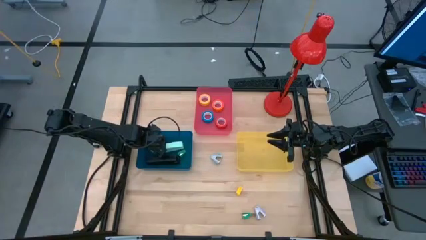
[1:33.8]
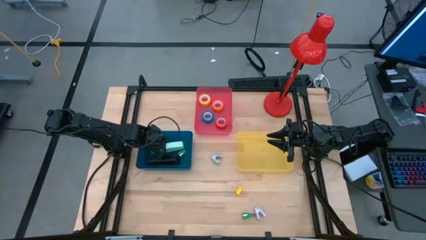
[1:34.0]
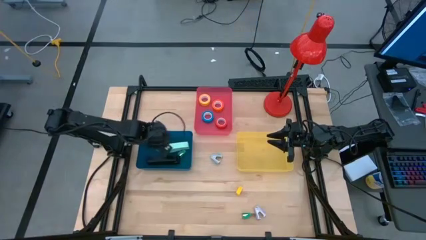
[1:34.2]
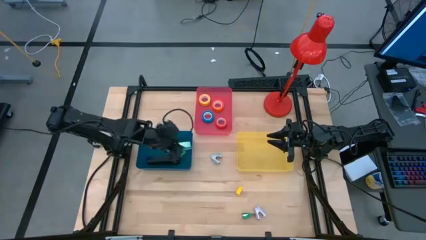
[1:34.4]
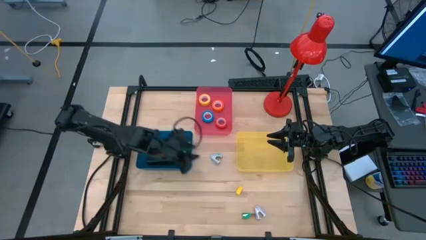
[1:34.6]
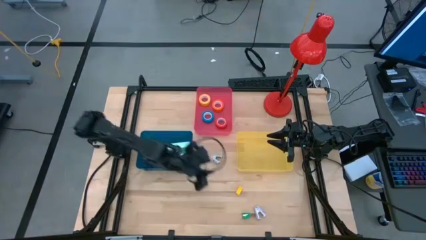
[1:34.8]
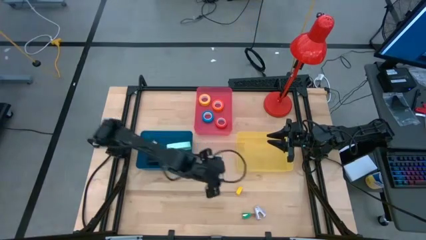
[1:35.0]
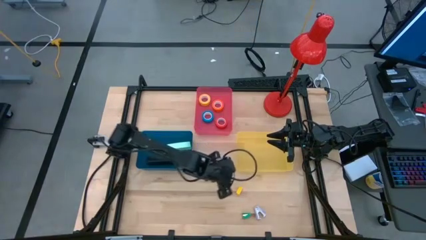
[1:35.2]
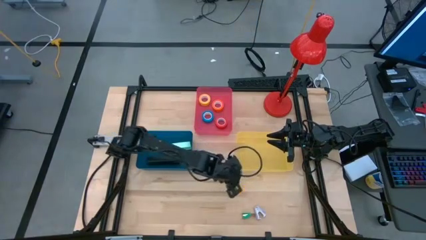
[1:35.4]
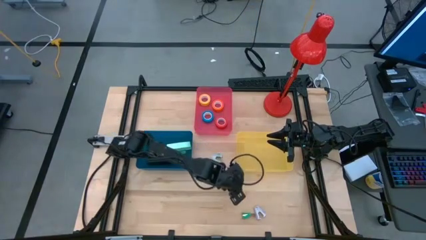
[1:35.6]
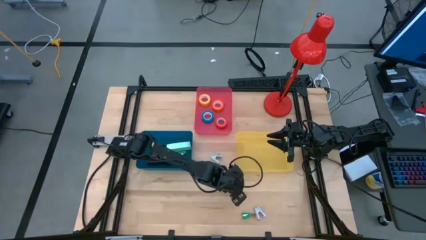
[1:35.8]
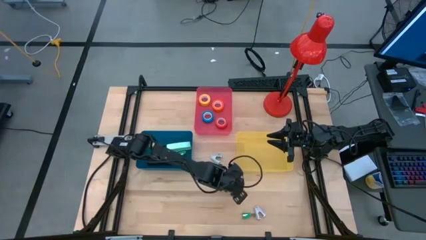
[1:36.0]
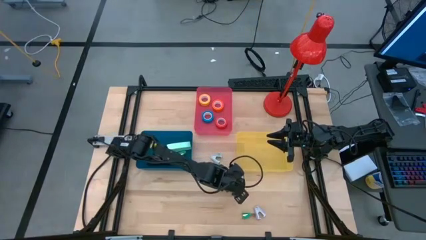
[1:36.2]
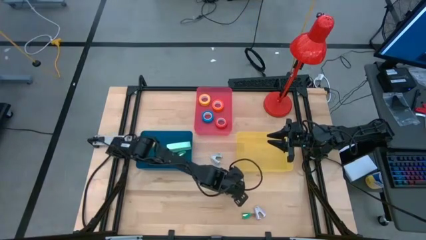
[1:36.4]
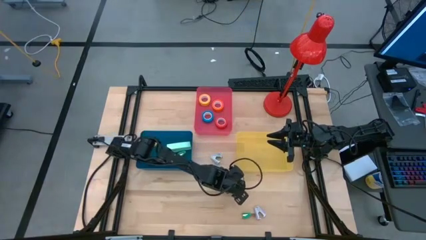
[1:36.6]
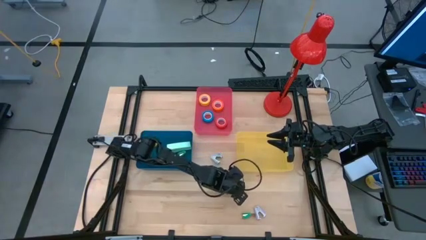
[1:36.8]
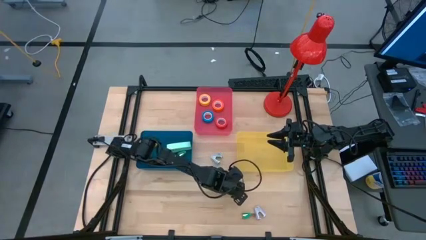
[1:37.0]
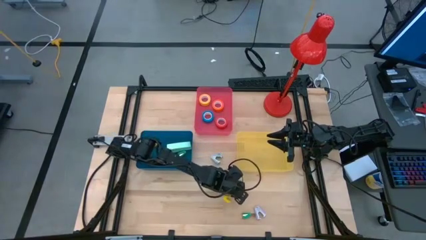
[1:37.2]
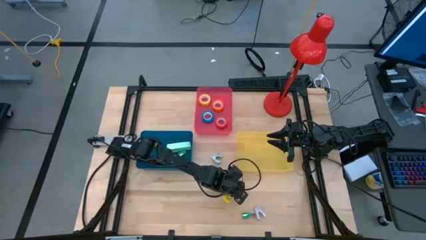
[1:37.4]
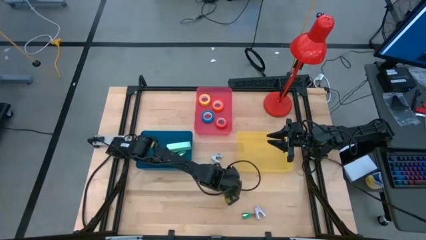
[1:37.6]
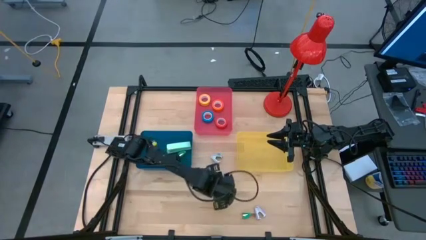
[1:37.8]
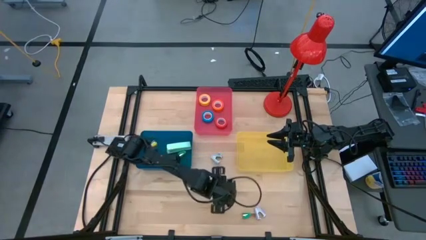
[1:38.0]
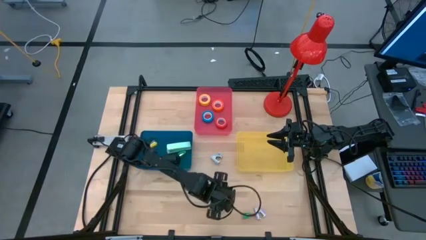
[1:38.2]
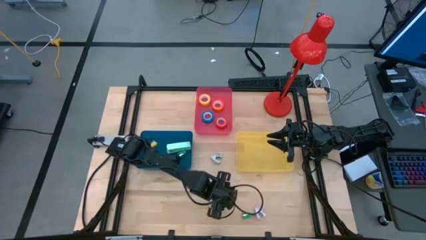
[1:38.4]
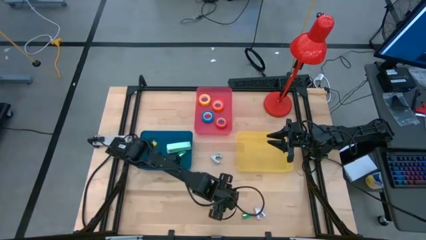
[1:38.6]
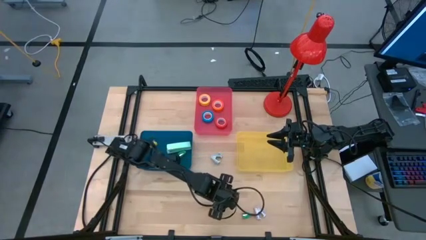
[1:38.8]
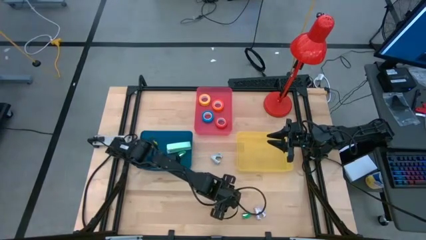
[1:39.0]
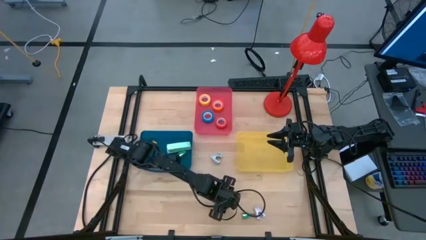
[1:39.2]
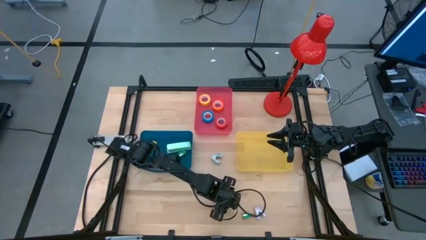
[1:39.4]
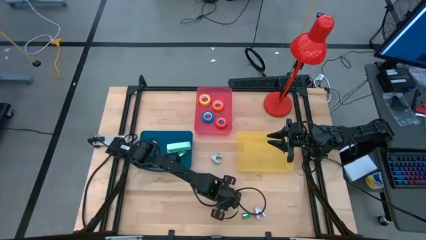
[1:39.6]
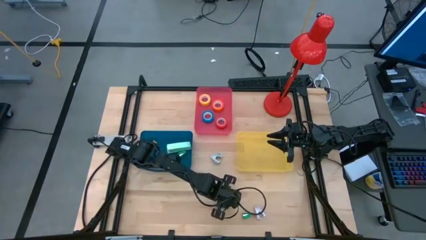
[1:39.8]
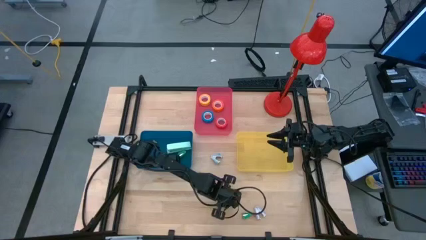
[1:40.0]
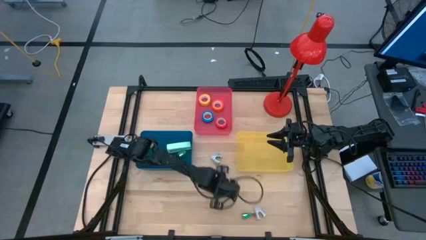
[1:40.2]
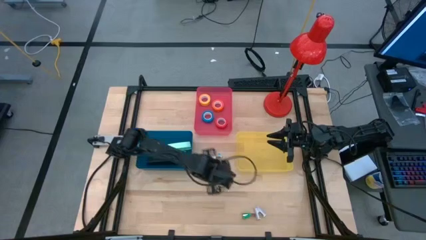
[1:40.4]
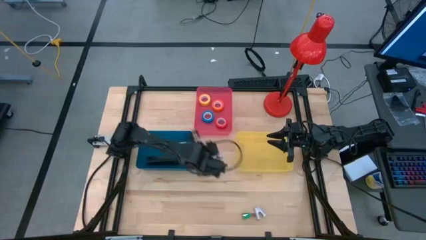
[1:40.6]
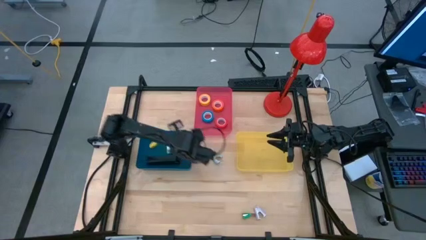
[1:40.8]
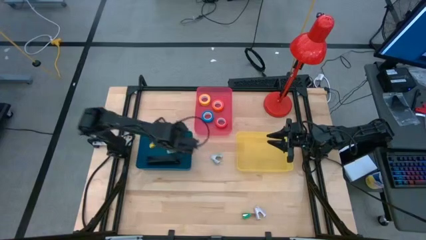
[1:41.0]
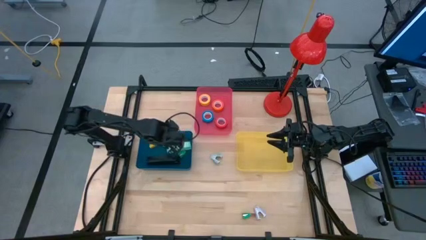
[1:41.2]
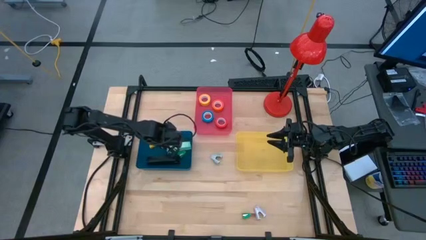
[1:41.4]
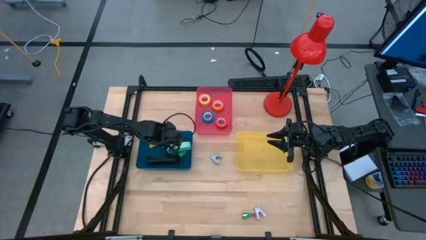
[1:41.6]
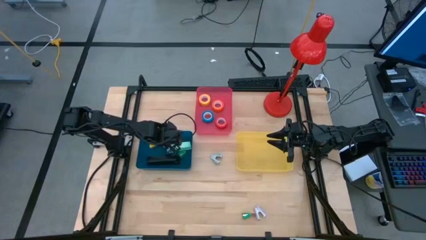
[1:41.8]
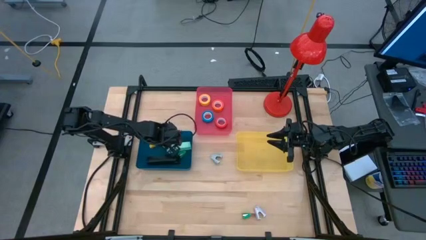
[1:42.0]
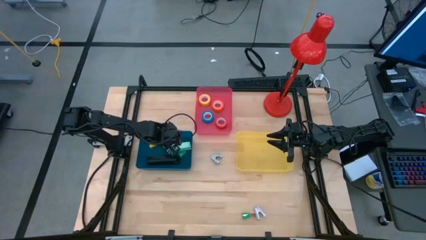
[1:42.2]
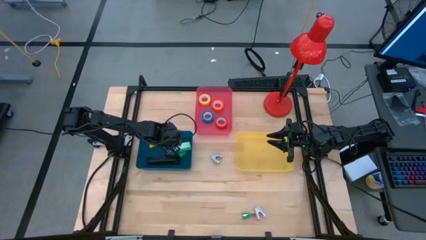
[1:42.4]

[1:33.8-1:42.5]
Task: Pick and place Stapler, Stapler remover, tape
Put the yellow stapler into the blue bin

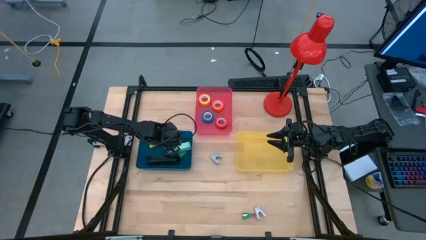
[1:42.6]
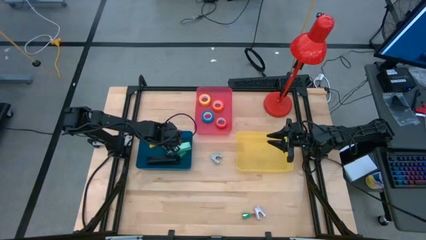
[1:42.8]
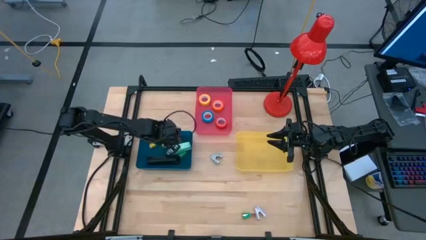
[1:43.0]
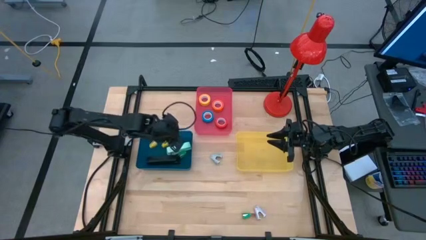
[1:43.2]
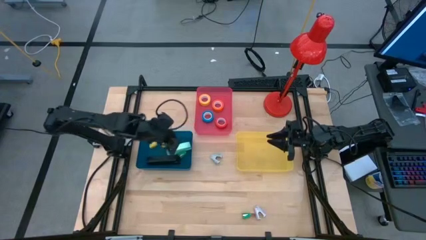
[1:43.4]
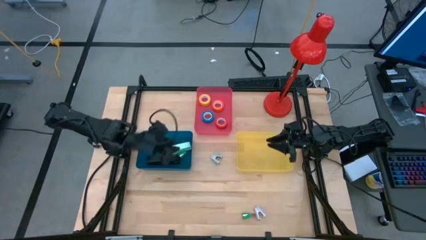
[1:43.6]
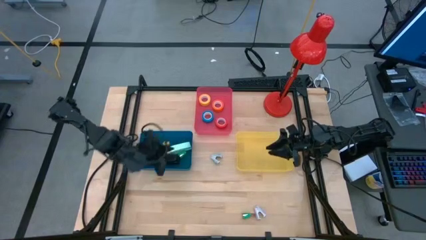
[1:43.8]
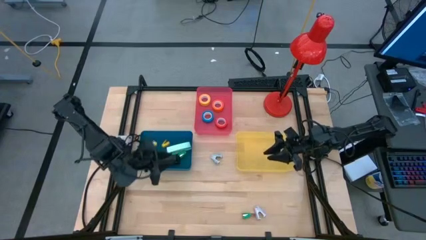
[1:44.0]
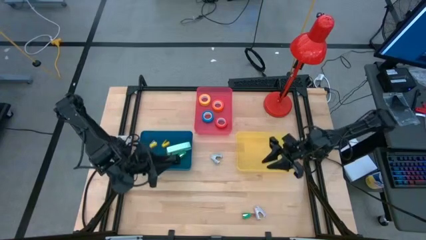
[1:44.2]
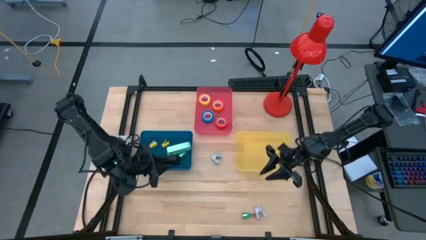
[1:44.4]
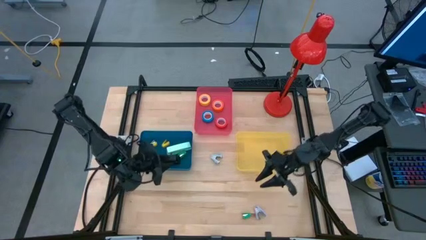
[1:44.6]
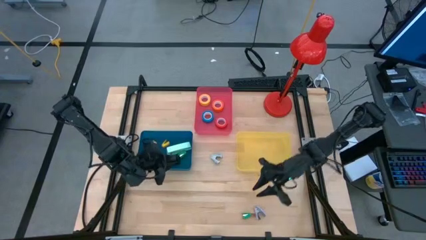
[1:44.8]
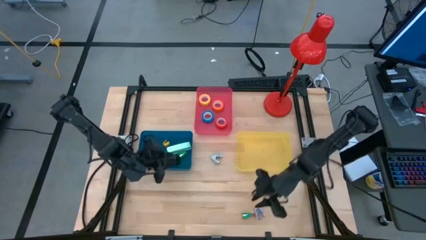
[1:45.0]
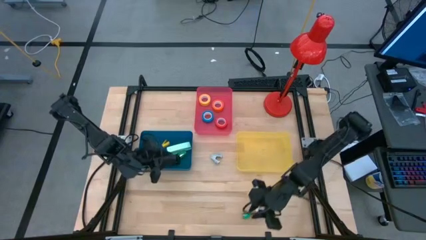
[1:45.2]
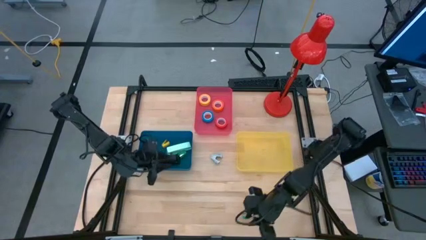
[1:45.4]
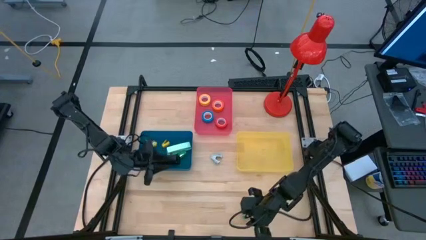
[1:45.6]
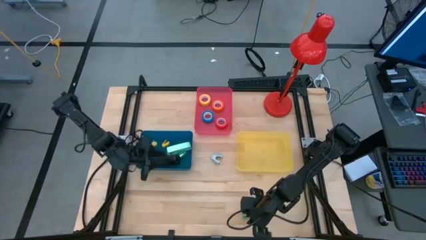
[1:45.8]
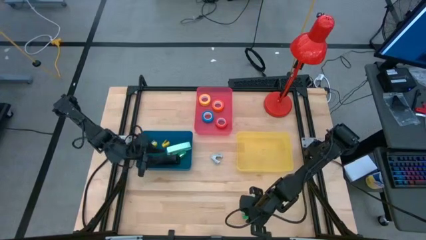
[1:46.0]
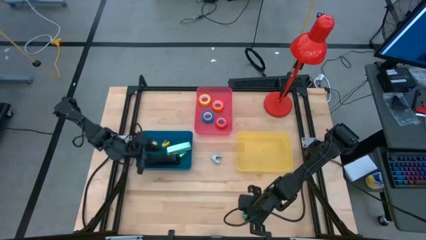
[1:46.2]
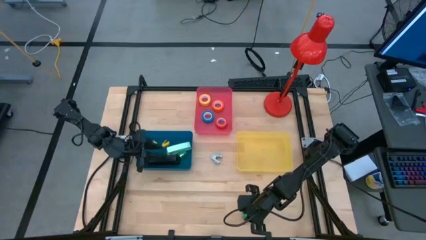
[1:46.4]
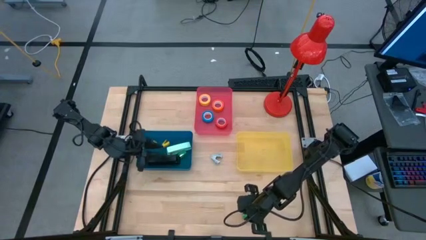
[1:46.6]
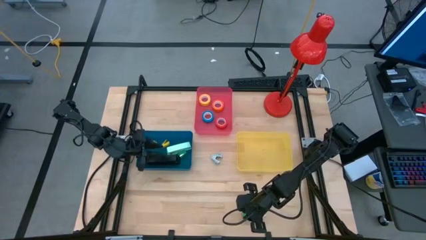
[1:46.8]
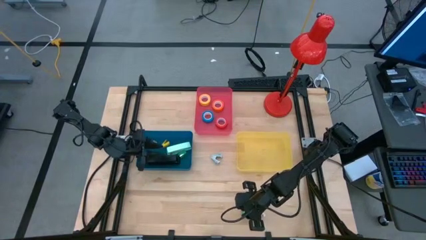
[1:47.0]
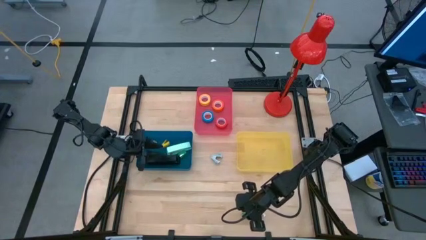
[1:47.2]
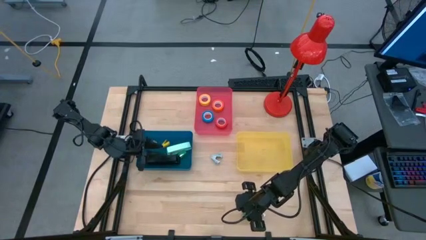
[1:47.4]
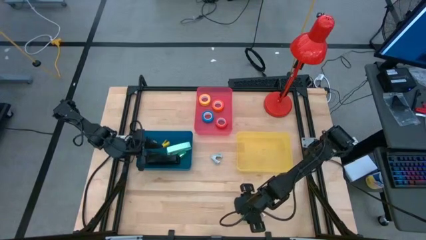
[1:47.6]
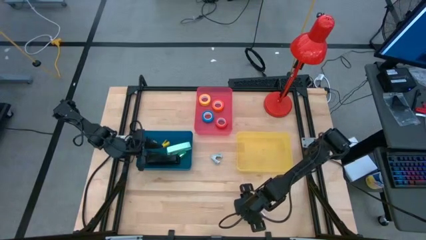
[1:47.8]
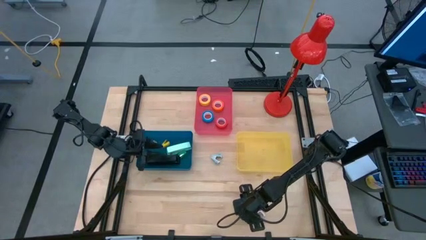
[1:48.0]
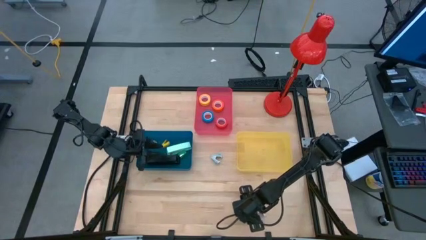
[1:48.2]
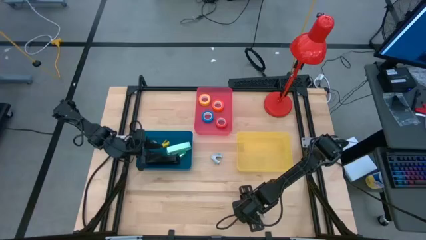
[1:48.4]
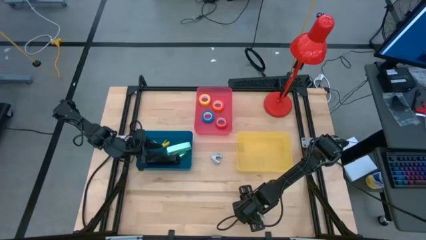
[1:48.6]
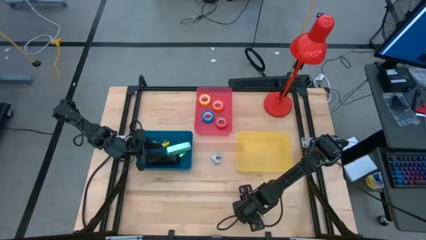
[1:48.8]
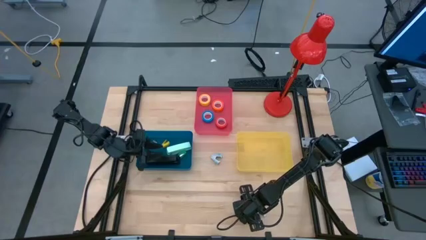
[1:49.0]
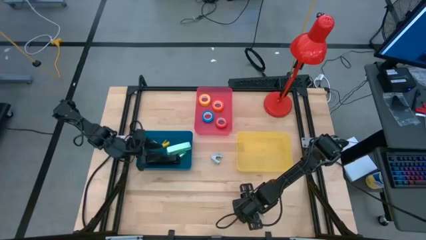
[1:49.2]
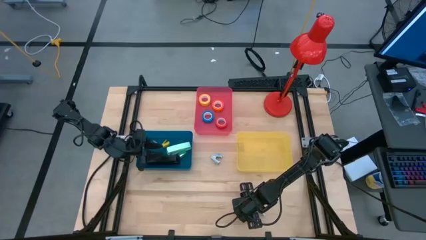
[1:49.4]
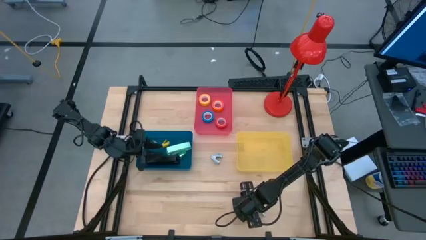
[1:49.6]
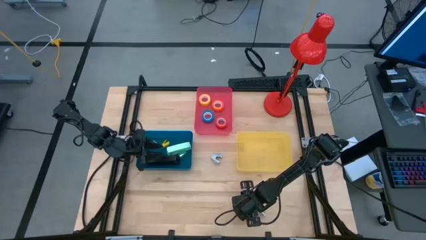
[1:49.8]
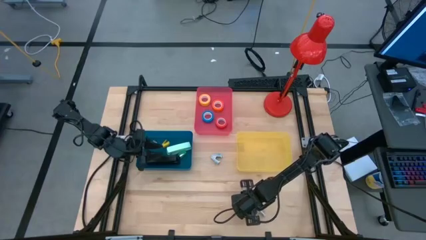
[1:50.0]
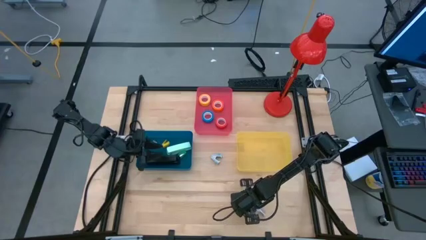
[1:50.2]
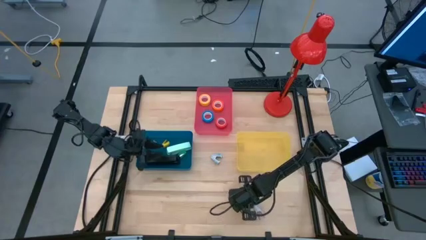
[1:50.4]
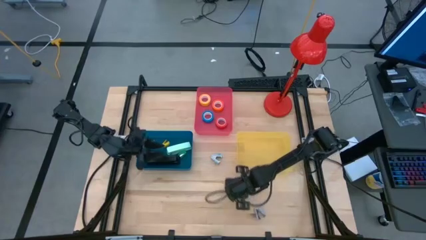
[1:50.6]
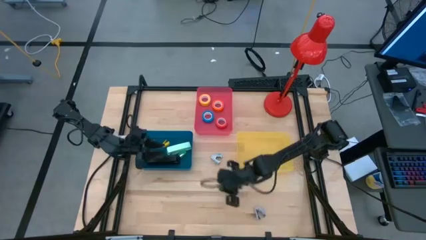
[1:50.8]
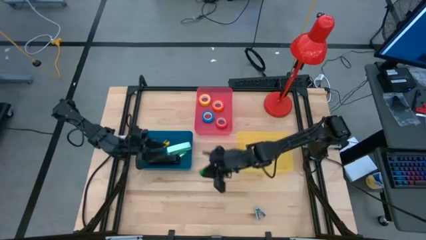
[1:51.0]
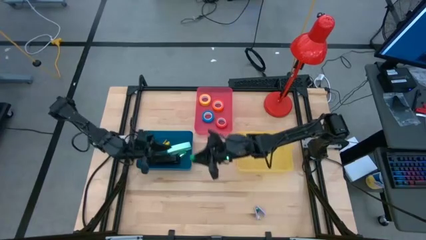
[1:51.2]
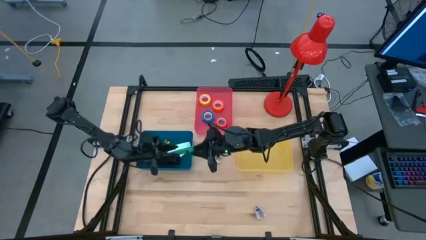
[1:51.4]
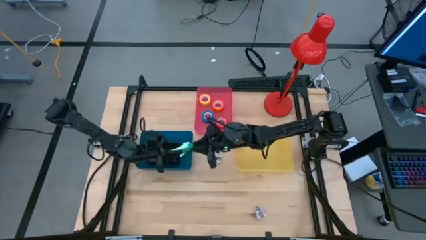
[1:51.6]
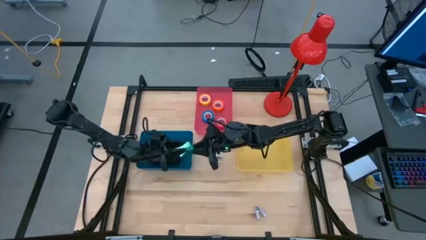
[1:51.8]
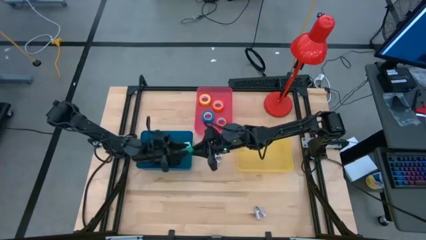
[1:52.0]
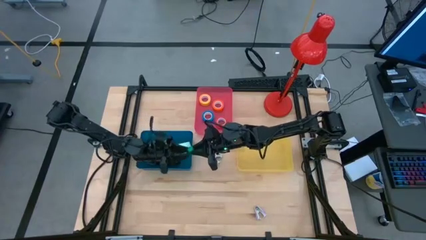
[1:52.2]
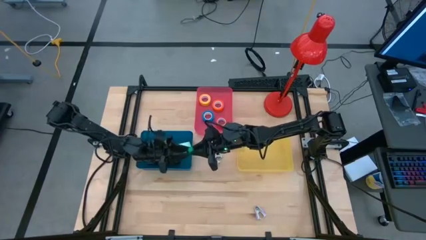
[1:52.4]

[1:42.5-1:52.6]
Put the green stapler into the blue bin
